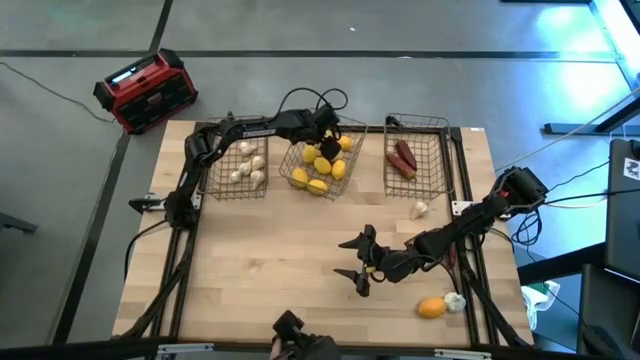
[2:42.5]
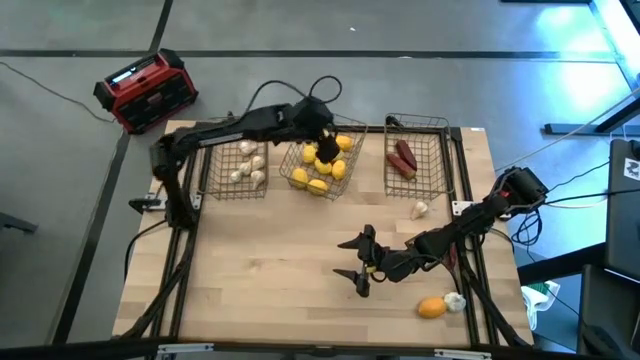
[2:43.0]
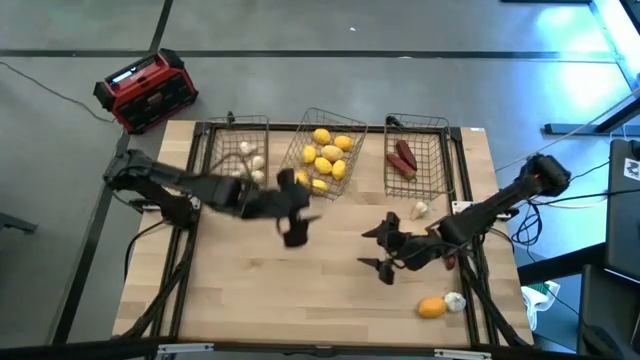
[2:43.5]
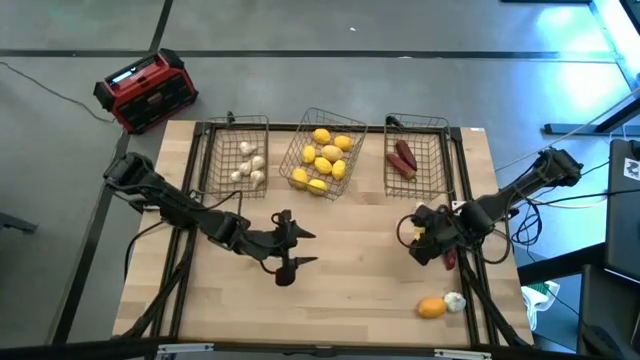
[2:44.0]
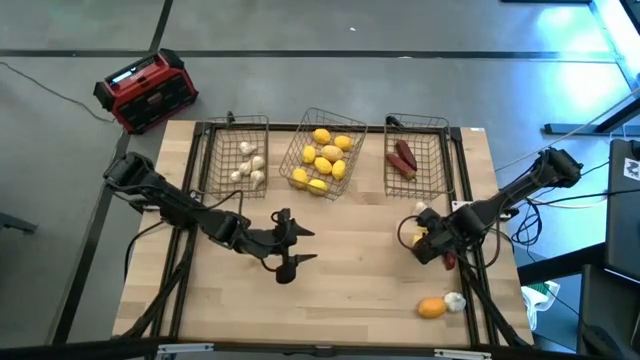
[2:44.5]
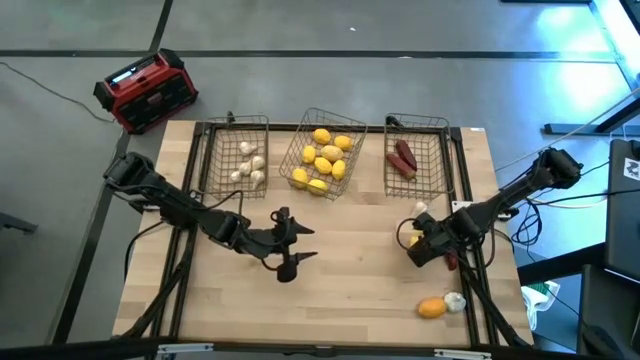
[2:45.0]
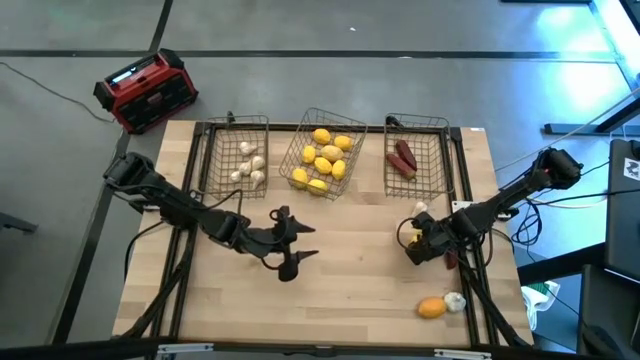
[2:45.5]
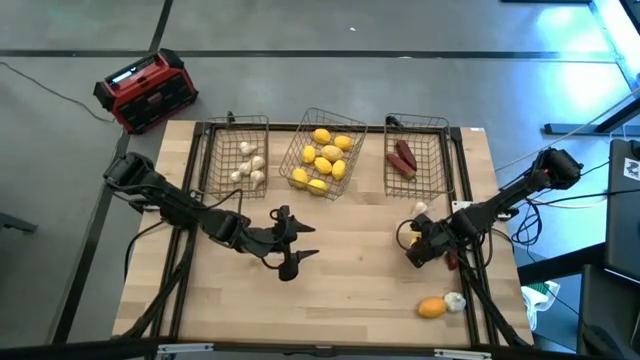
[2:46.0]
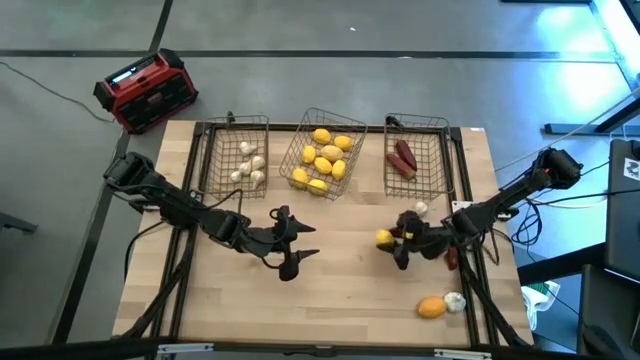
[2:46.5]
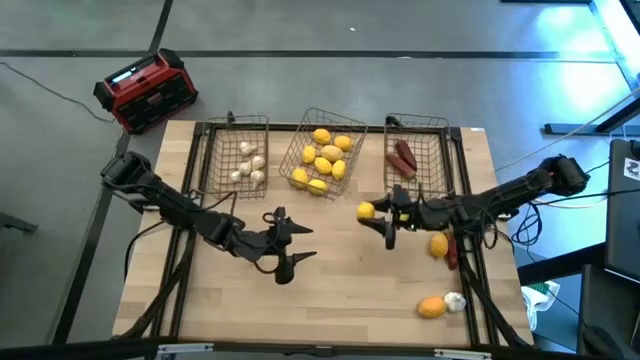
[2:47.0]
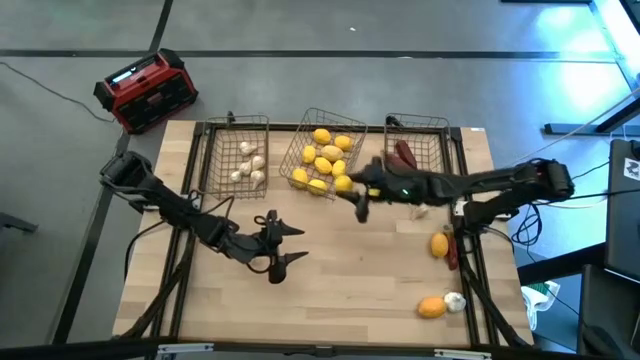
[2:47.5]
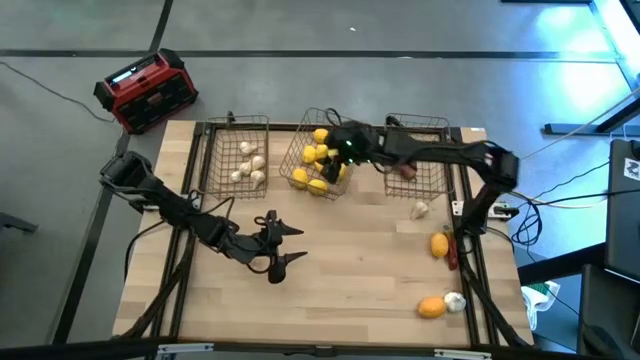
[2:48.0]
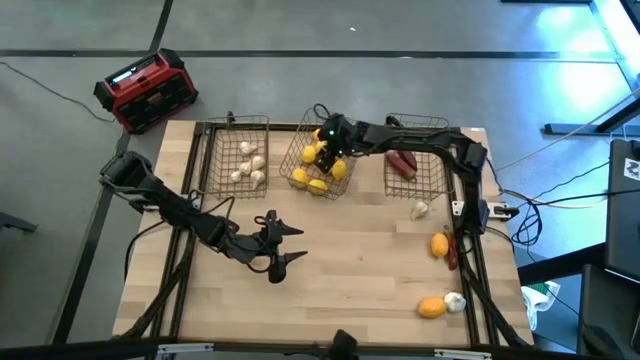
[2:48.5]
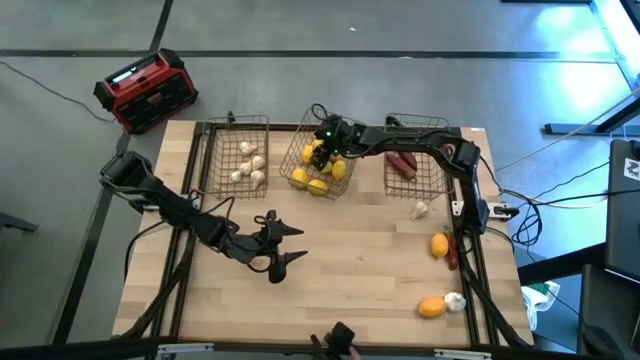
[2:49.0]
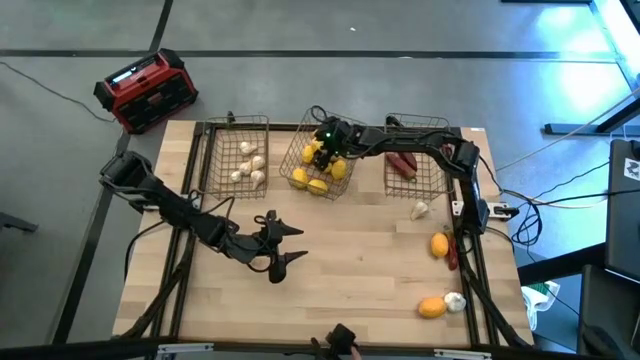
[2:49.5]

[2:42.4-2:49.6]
Task: Sort produce into baskets
Put the lemon into the middle wire basket

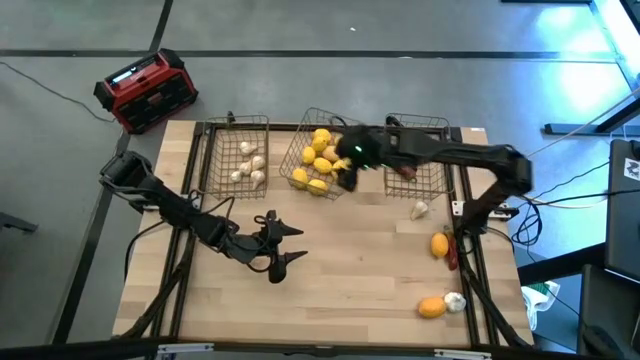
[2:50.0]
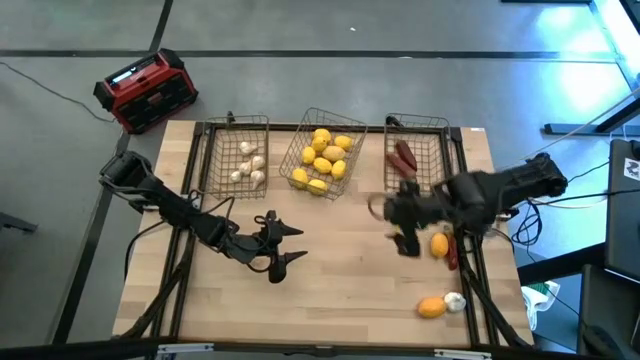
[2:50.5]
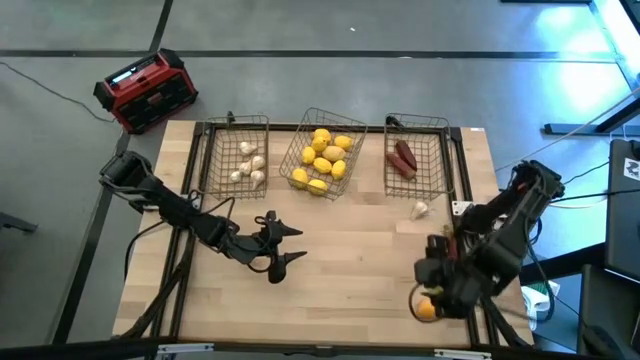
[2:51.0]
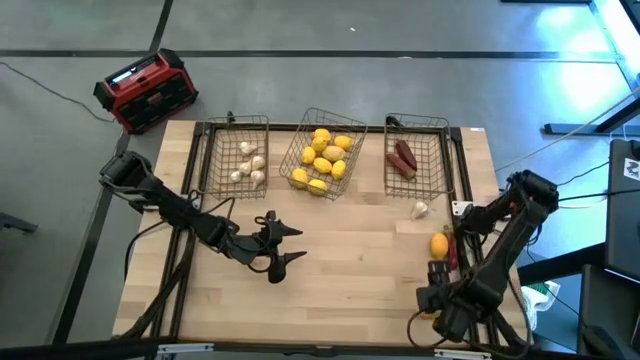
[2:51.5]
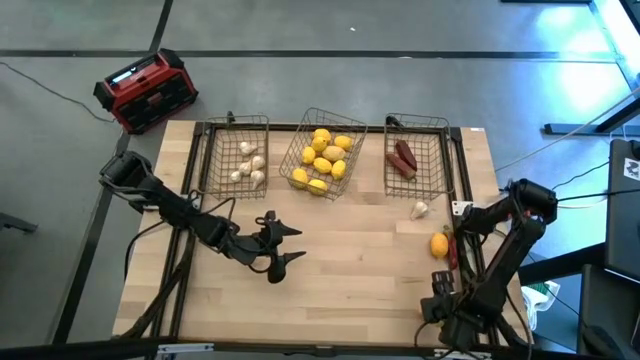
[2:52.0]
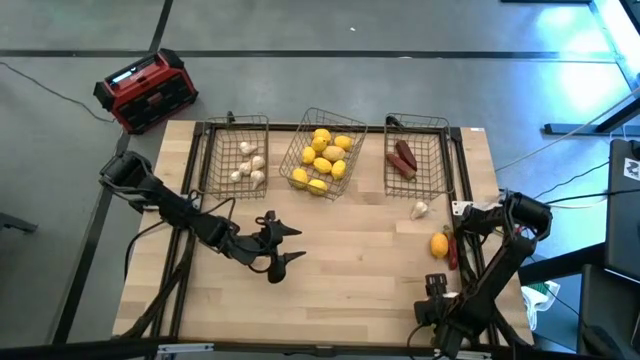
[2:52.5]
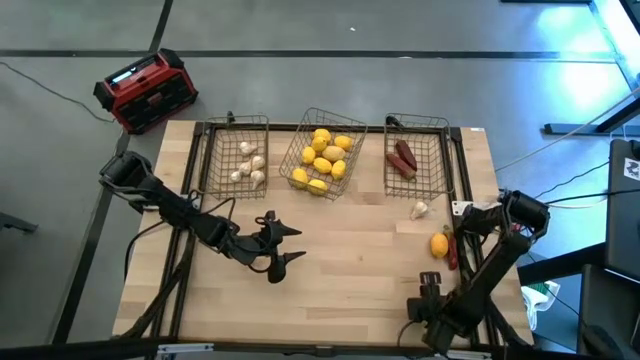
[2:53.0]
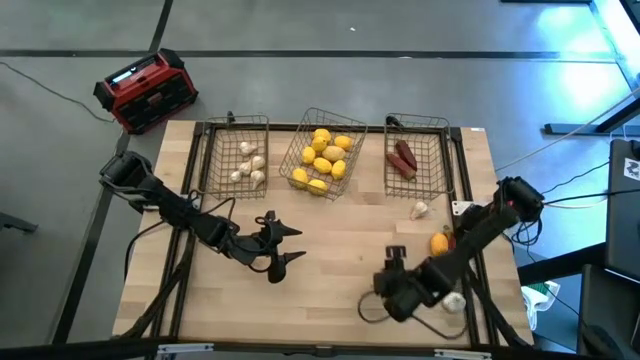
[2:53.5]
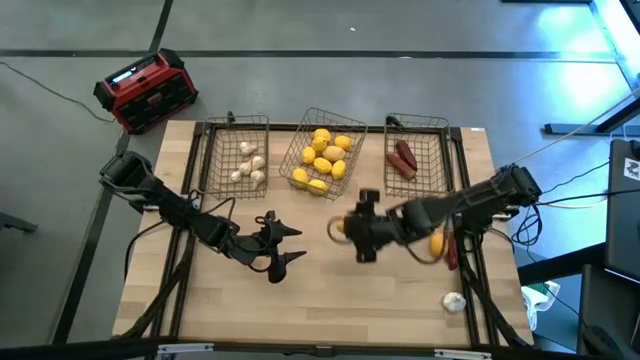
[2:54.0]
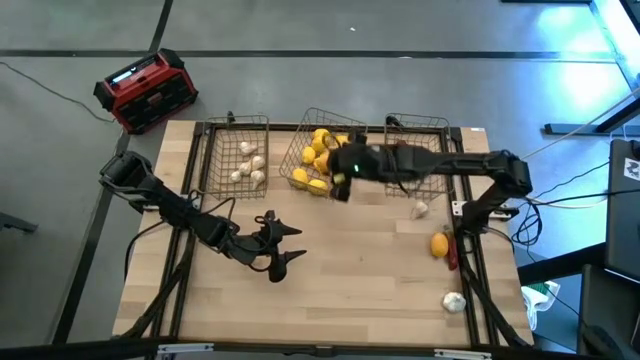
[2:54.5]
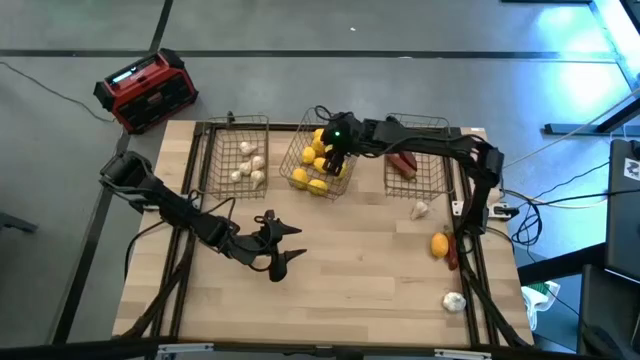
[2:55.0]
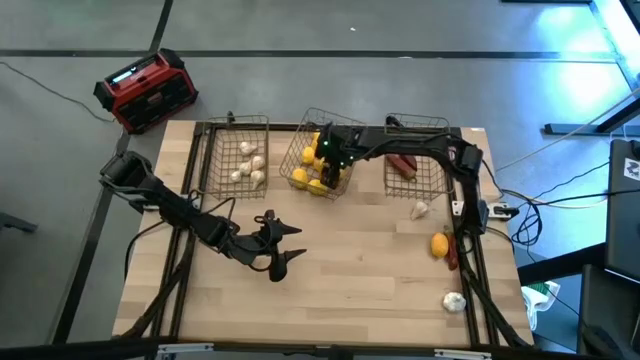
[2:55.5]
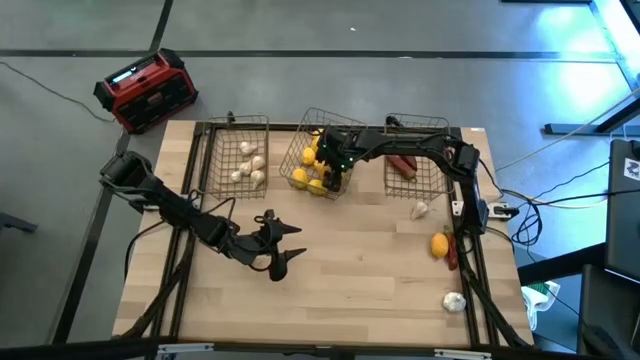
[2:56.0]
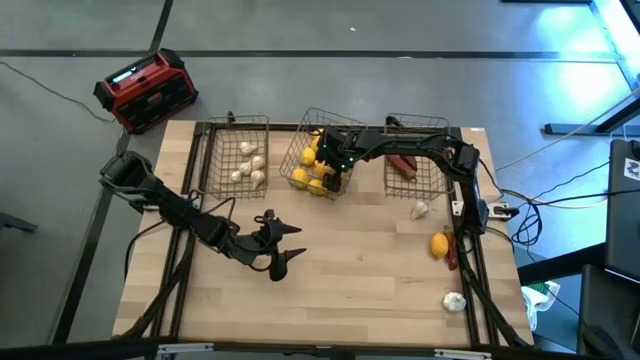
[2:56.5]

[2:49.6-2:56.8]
Put the lemon into the middle wire basket

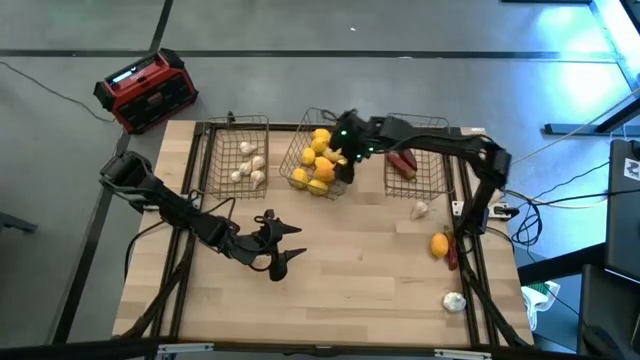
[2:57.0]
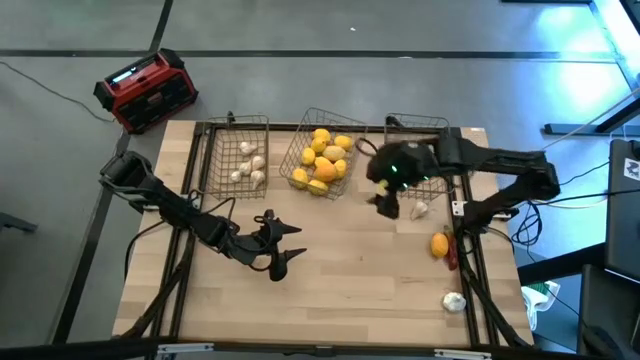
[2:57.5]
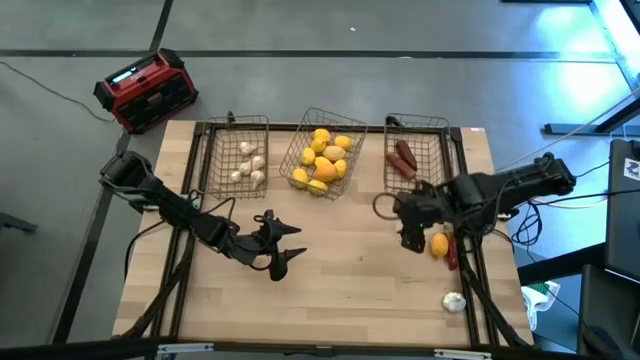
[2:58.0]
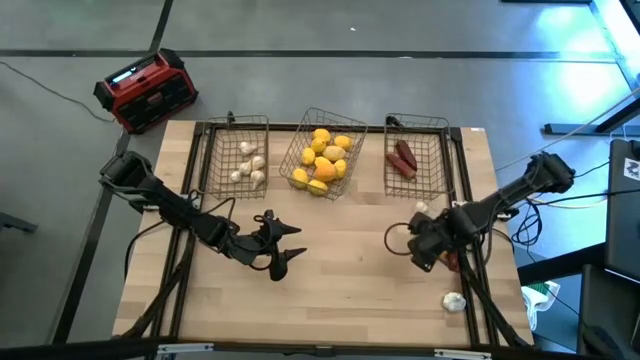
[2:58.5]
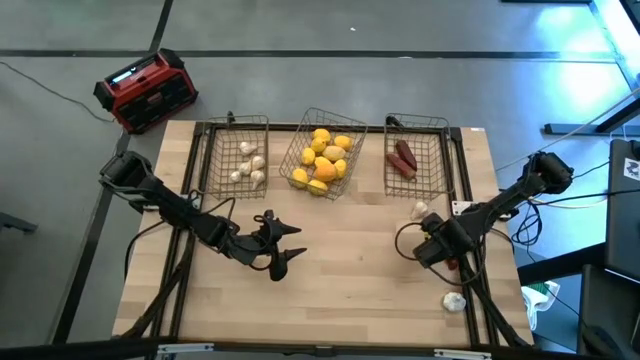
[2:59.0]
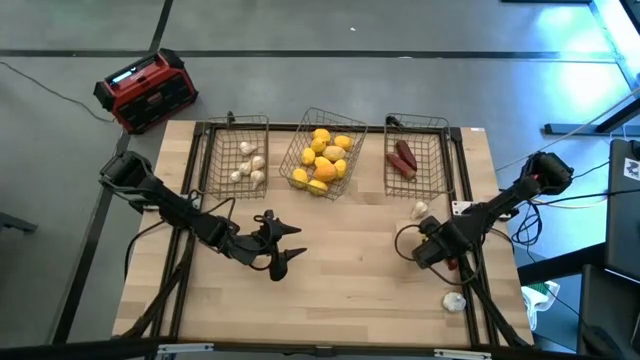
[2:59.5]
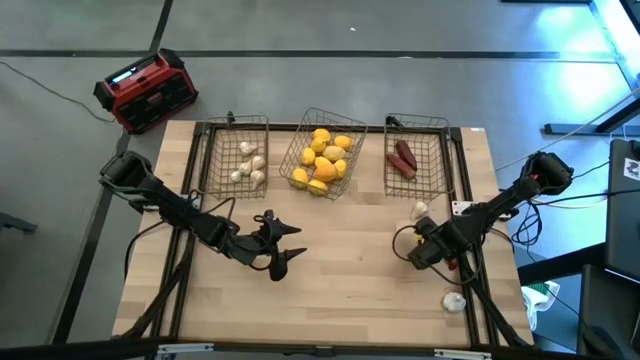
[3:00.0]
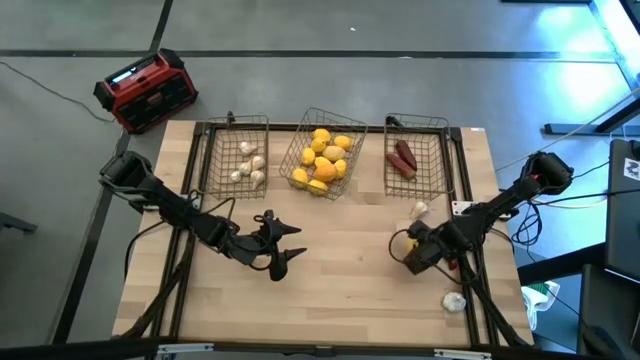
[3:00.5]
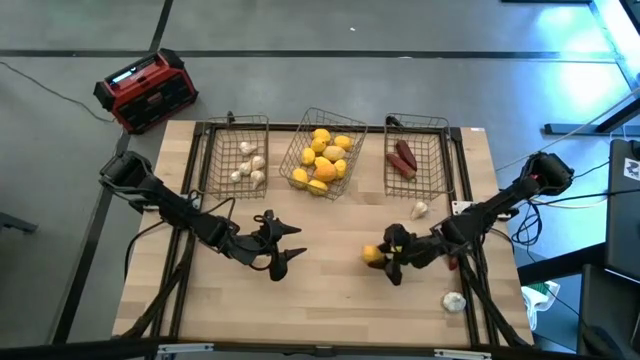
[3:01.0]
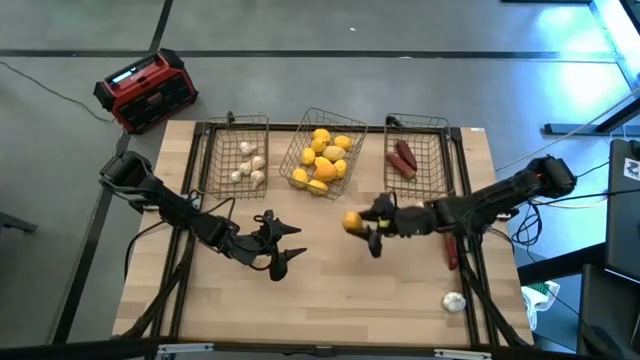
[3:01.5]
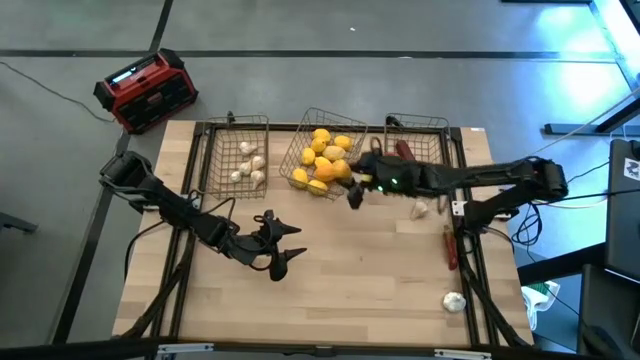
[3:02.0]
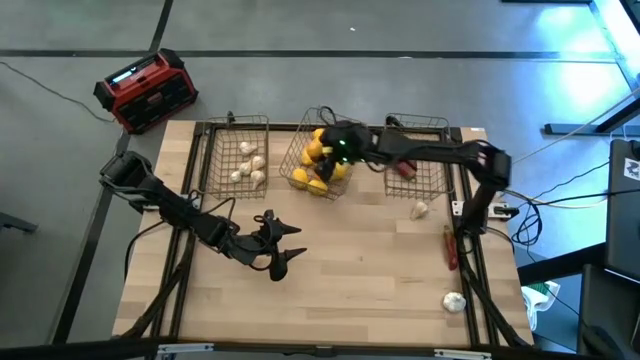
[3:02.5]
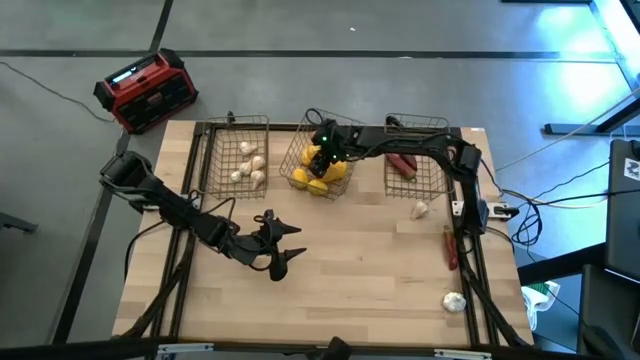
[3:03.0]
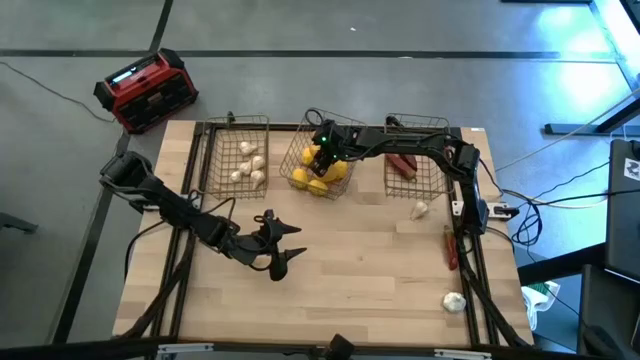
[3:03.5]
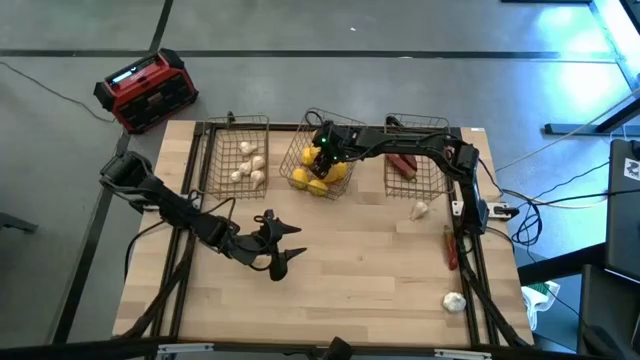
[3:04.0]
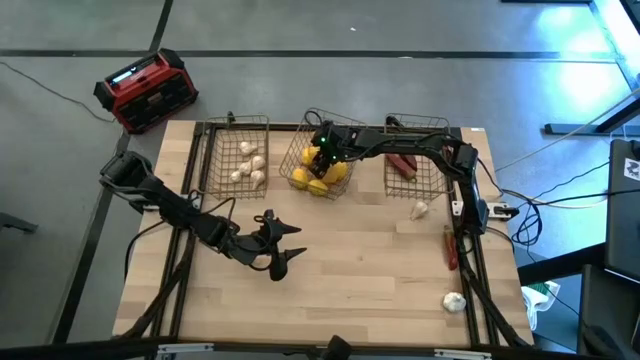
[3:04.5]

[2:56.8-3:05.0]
Put the lemon into the middle wire basket
